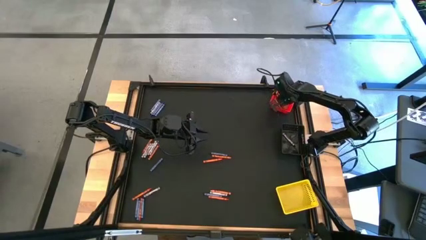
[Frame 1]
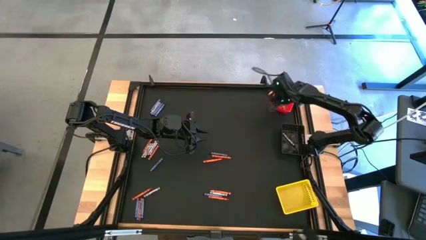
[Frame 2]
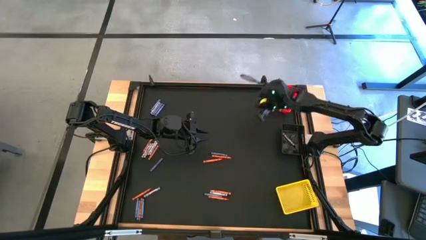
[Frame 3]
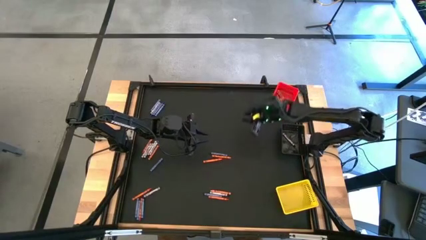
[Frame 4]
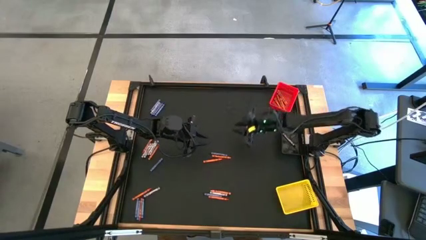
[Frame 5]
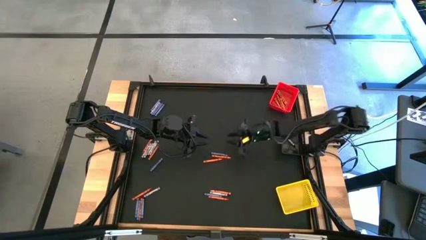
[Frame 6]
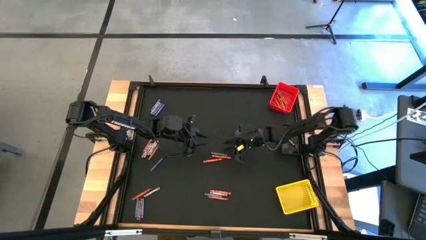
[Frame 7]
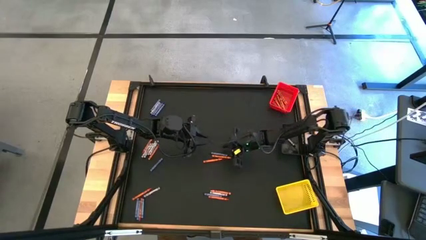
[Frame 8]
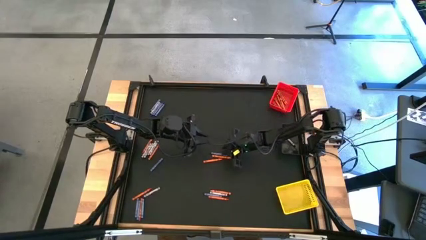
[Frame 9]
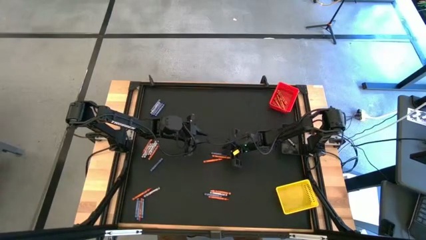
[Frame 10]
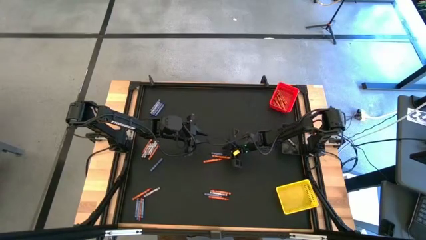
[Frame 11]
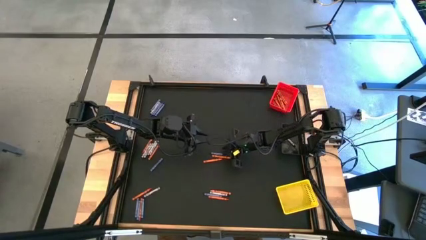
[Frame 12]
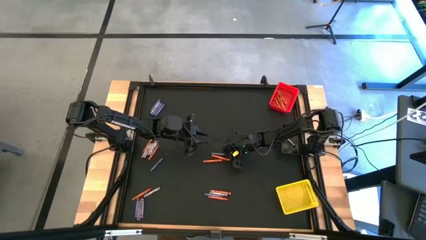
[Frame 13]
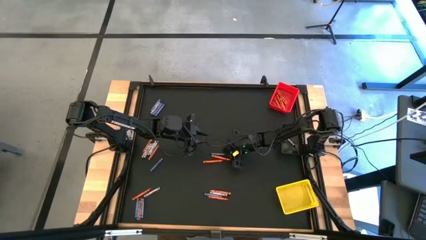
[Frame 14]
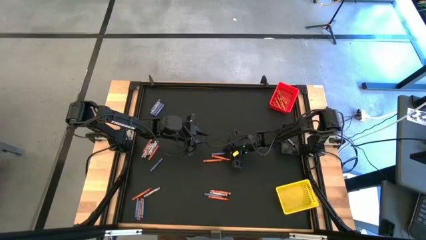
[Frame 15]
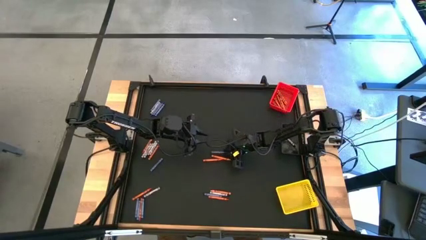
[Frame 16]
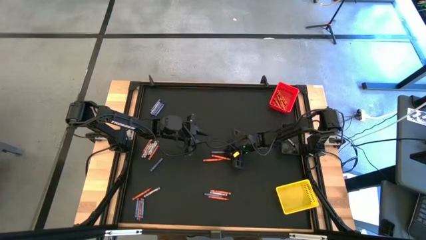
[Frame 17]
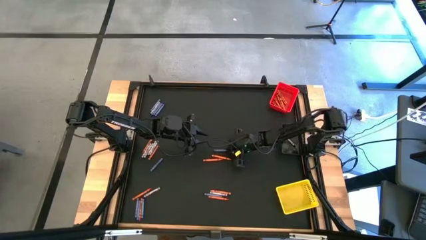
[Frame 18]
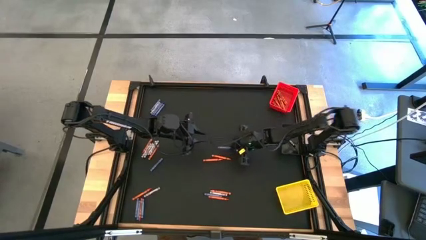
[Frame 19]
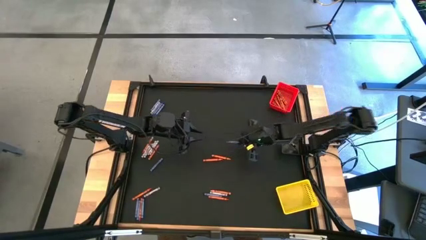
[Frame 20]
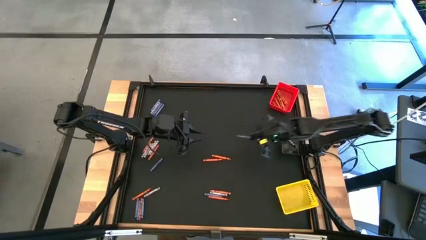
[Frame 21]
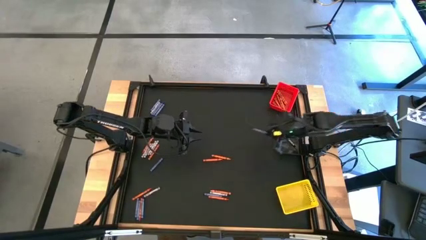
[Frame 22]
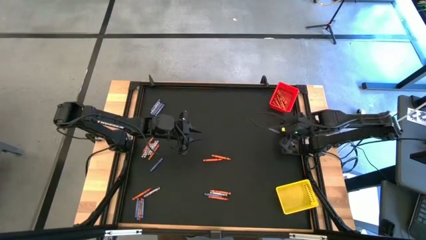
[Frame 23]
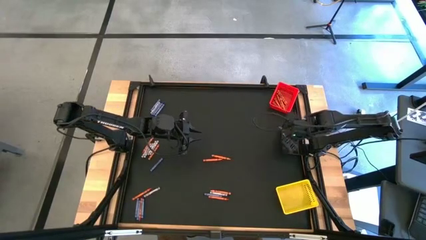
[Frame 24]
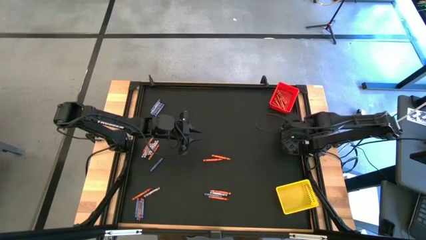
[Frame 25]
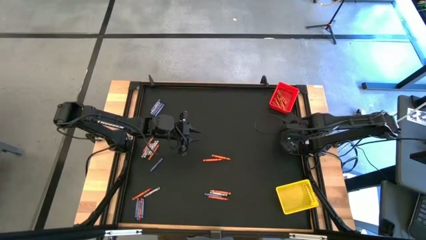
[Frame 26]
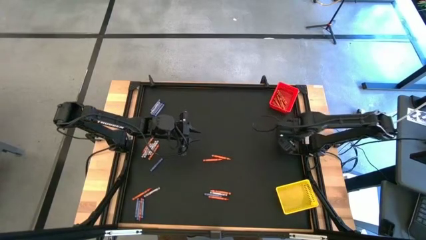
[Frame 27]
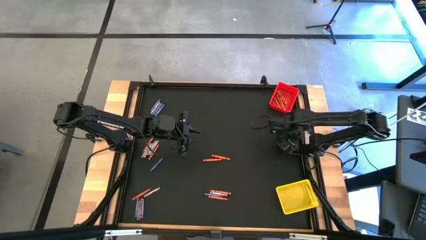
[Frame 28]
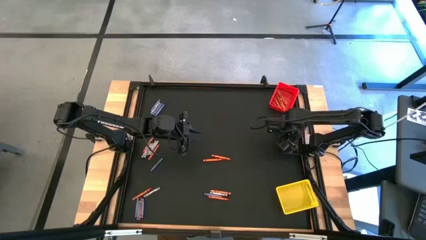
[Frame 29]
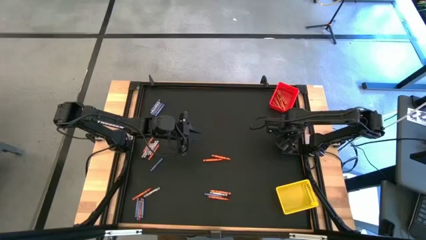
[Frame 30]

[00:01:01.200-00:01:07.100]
Task: Sort crayons
Put the blue crayon into the black bin

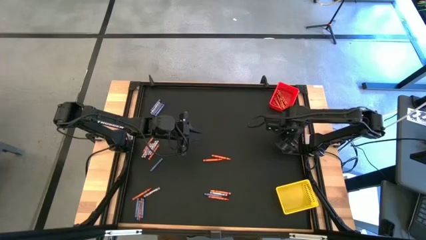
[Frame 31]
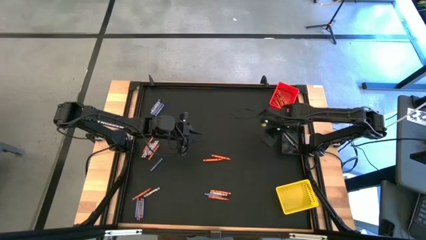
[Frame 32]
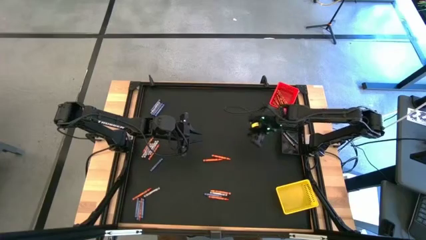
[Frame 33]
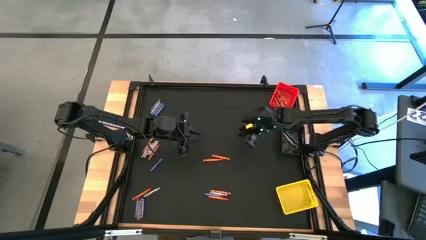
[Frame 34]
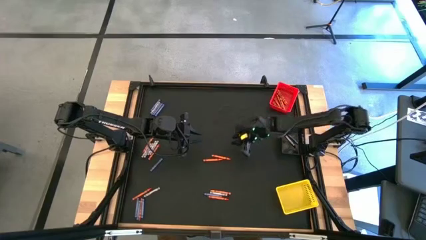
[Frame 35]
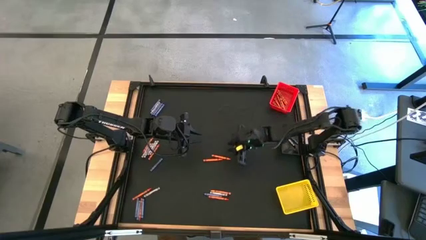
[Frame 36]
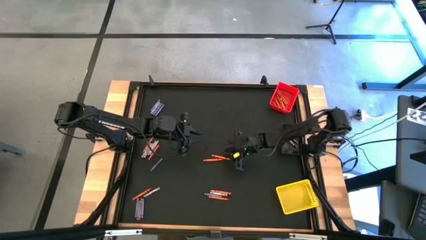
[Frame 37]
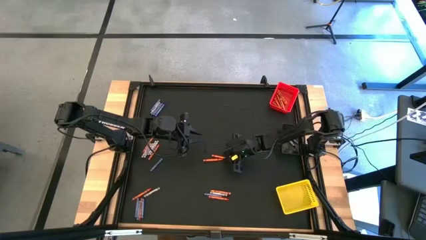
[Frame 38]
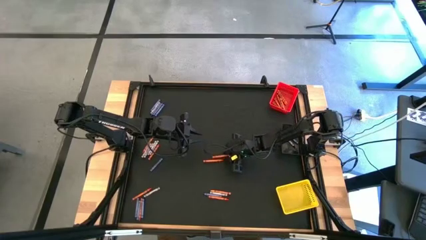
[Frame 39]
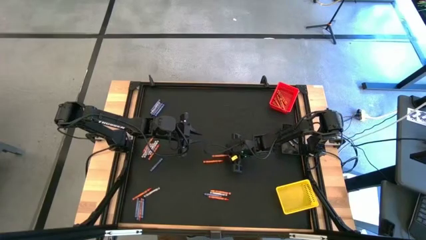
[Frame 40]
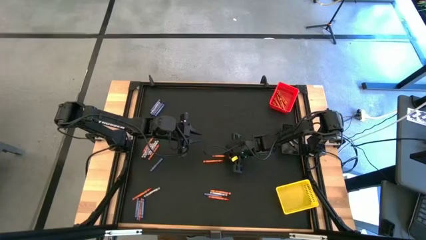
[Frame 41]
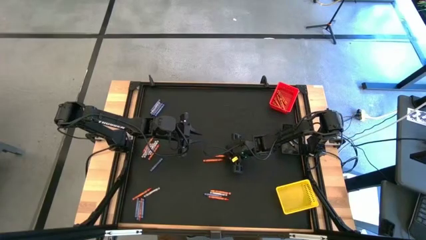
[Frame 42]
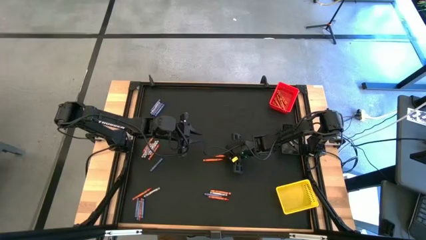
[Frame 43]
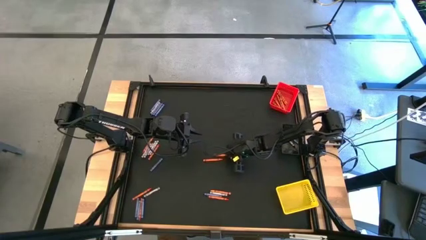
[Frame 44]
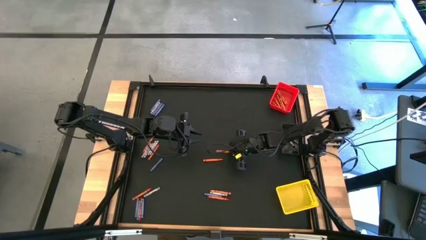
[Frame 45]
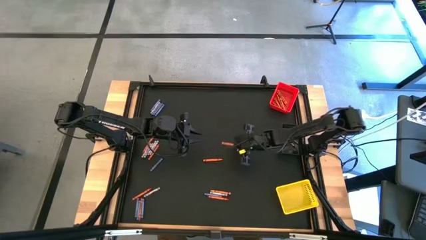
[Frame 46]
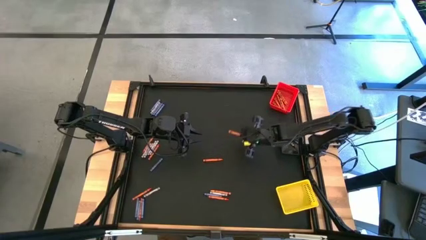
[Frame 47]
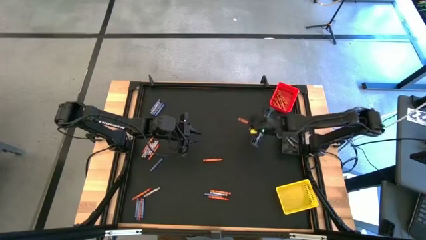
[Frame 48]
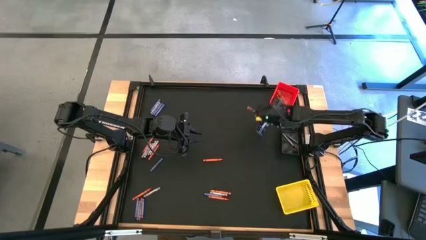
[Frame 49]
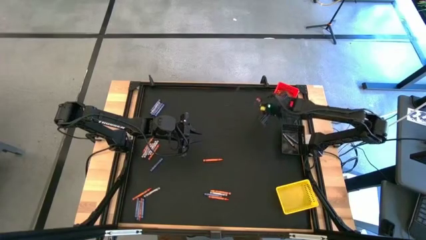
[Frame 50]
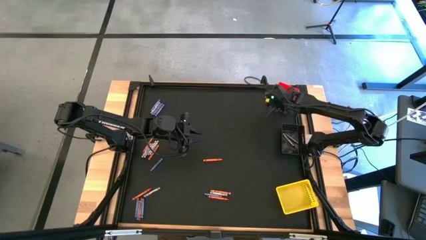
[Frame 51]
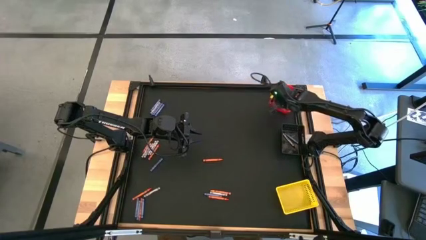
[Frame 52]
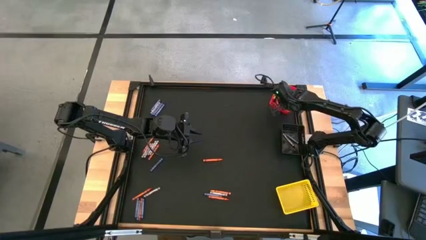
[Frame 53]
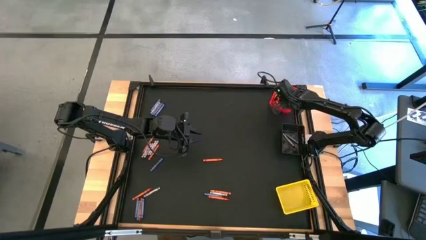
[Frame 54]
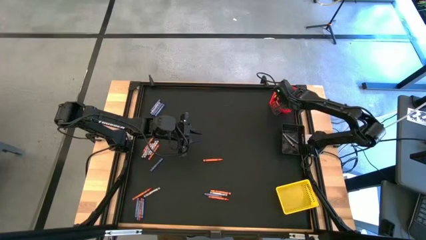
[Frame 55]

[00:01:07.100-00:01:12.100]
Put the orange crayon into the red bin

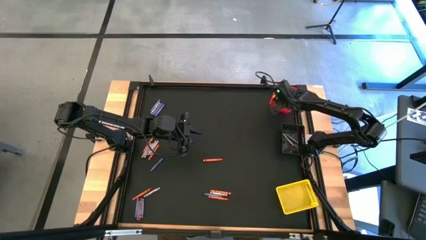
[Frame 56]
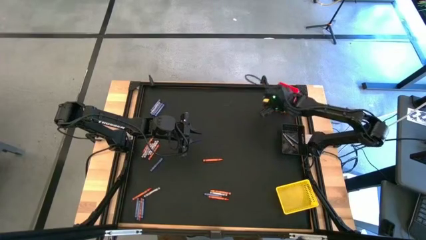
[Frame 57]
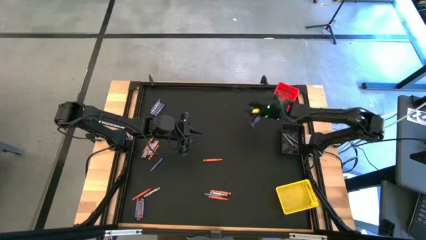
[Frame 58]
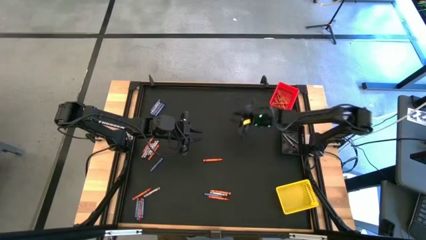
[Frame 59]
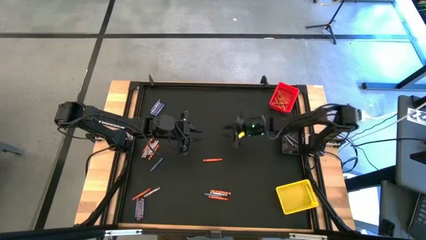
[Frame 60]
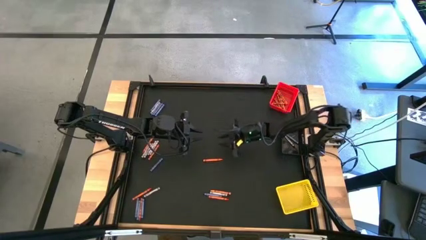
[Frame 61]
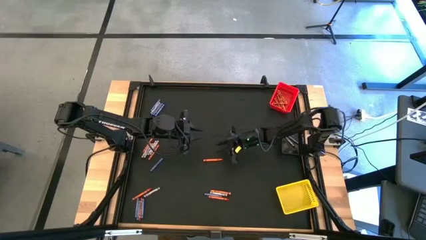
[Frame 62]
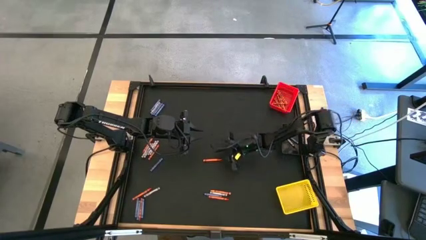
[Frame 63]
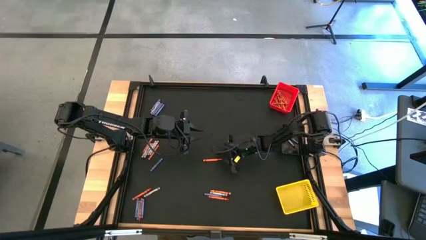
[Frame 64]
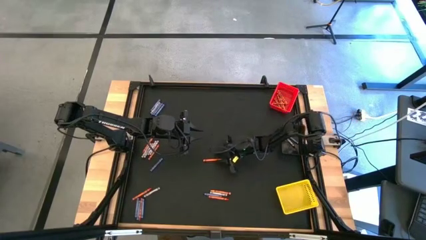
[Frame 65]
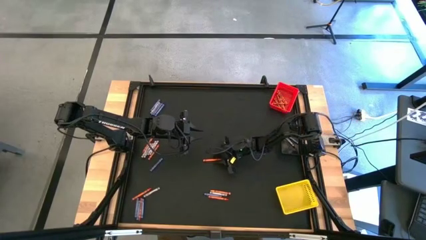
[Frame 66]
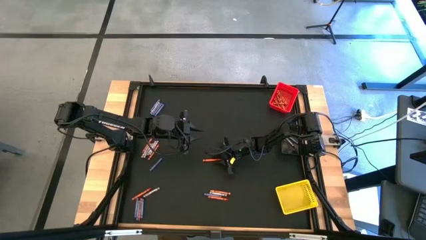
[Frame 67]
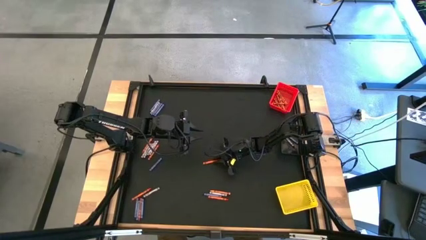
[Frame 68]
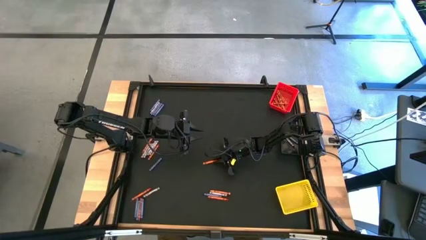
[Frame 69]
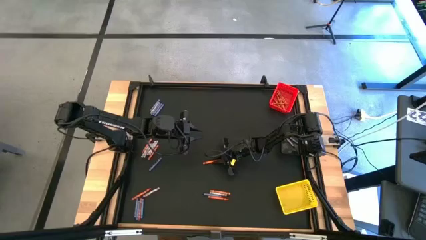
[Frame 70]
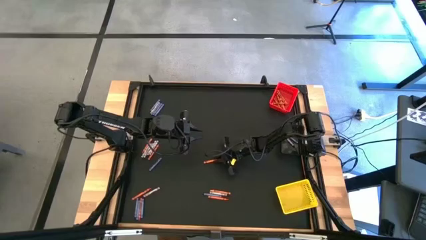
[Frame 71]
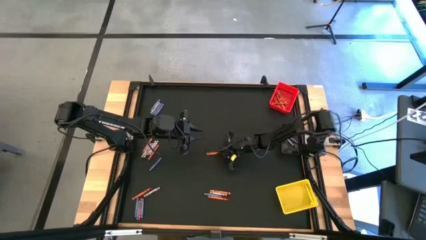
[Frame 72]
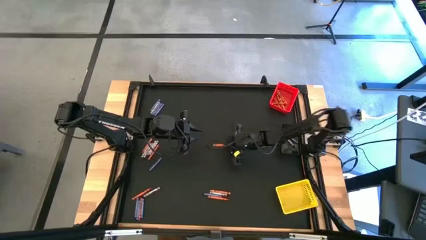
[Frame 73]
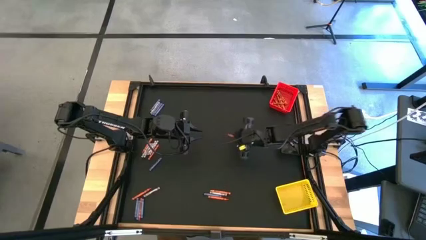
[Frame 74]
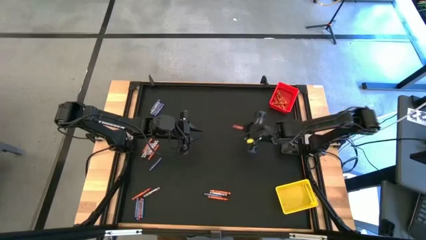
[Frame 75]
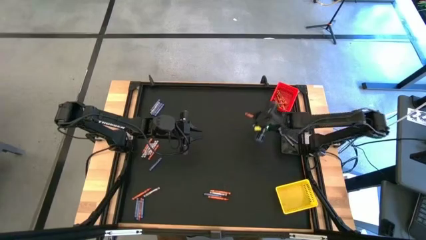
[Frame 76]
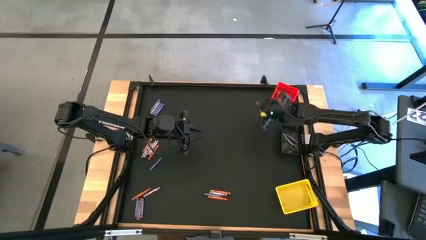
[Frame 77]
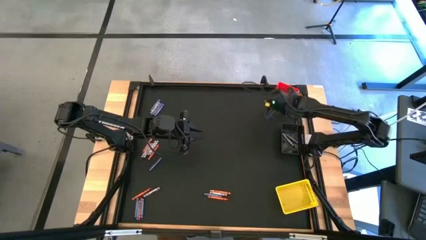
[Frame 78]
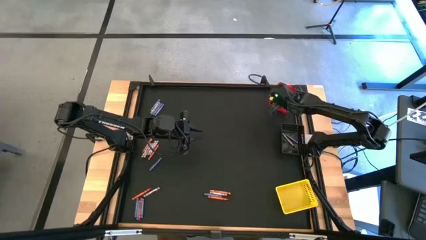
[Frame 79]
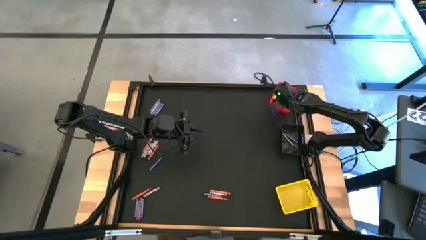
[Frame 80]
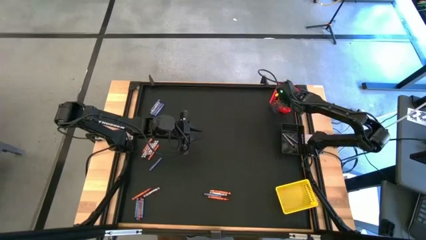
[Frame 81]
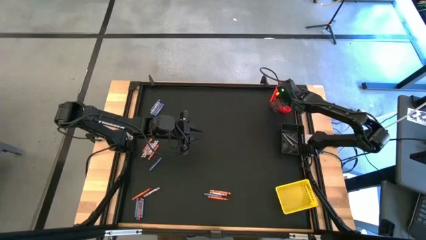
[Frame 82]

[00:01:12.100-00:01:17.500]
Put the orange crayon into the red bin

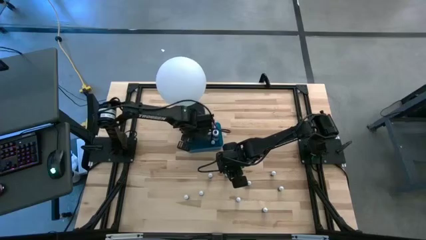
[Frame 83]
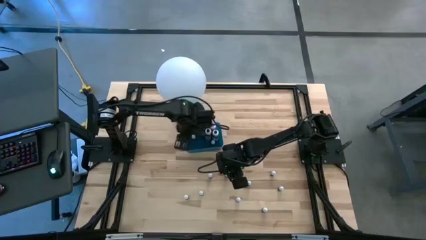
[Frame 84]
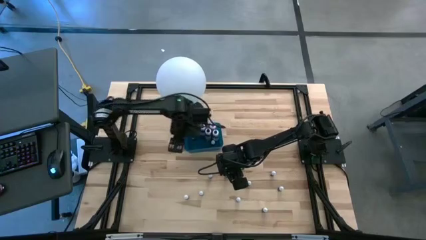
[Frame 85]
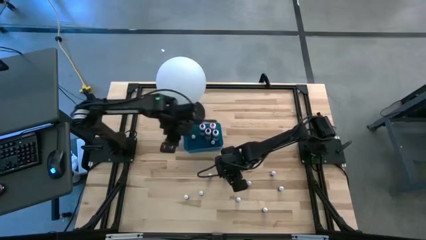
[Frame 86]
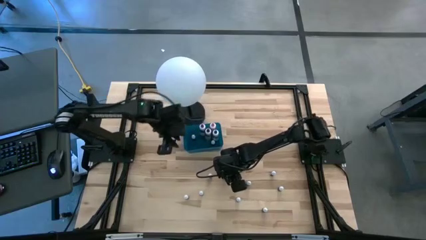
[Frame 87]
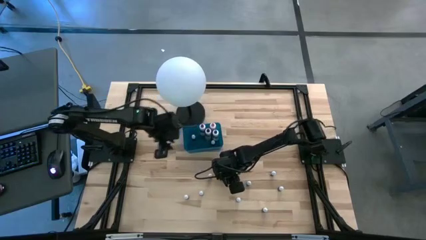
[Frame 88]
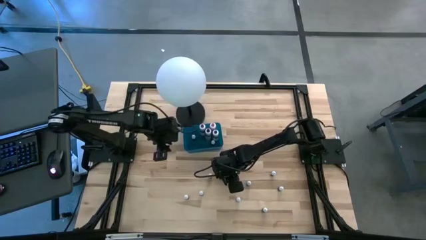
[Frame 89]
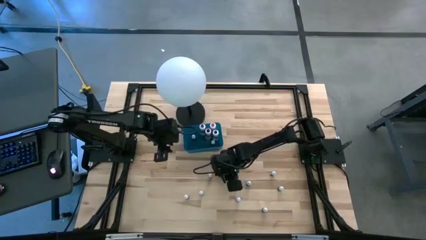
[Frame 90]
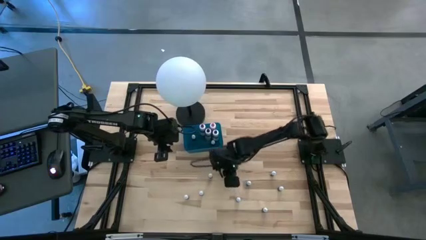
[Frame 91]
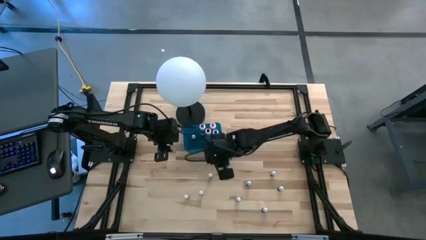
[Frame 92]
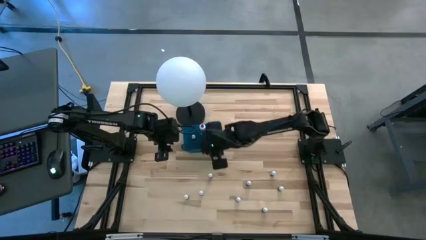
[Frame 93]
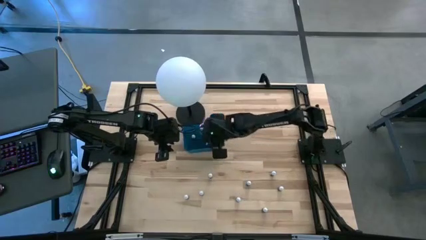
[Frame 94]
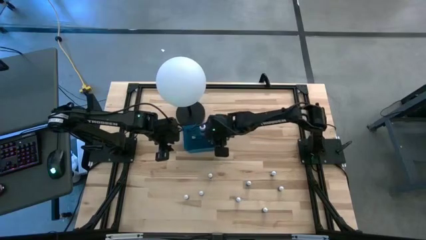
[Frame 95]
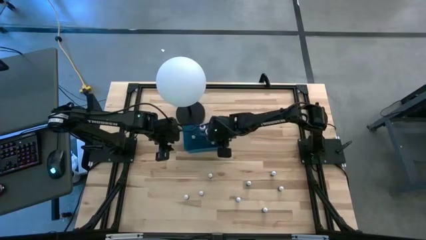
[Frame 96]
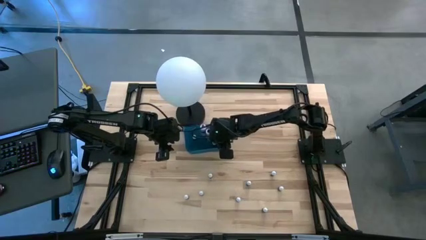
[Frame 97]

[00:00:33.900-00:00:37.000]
Task: Pick & Place food coloring
Put the small violet food coloring bottle into the blue container
